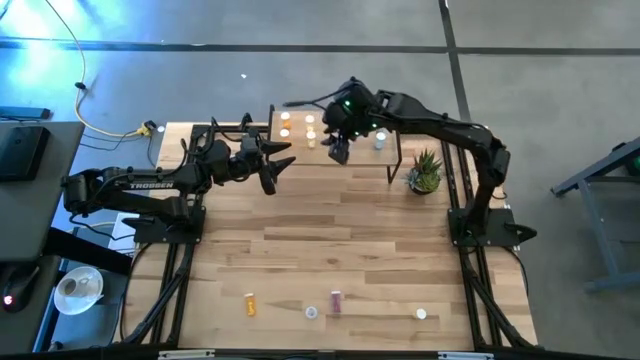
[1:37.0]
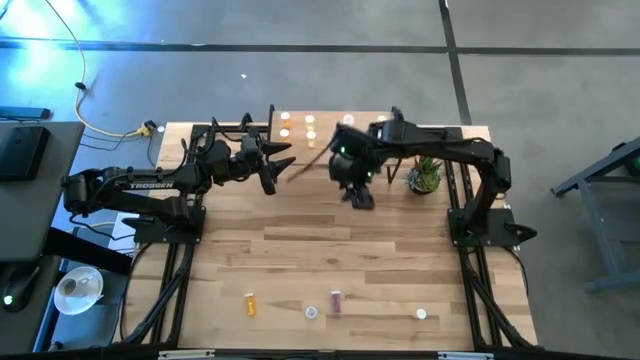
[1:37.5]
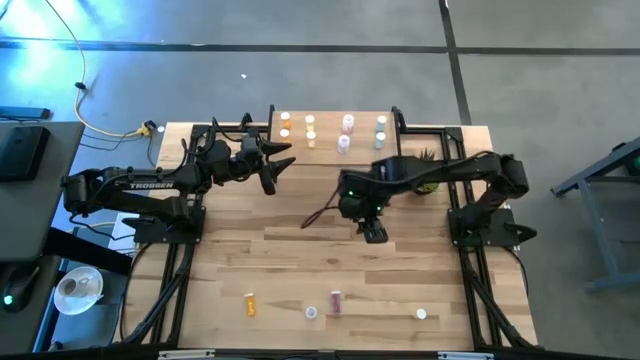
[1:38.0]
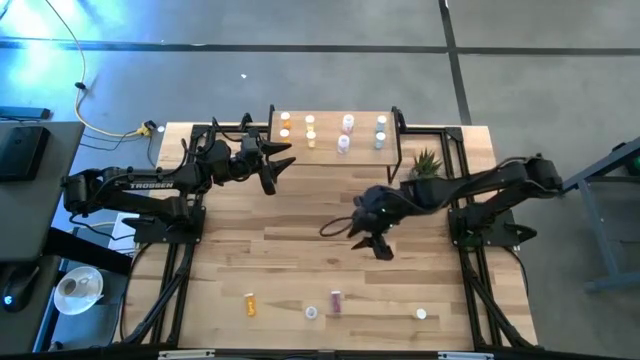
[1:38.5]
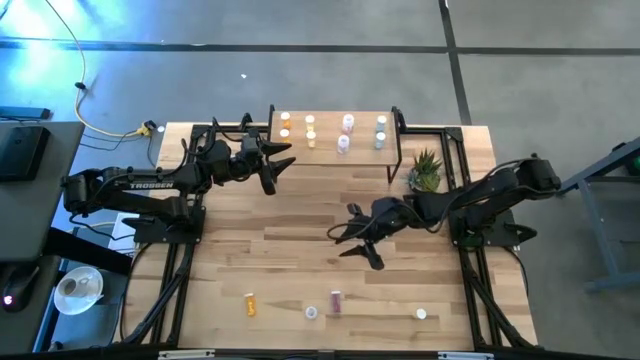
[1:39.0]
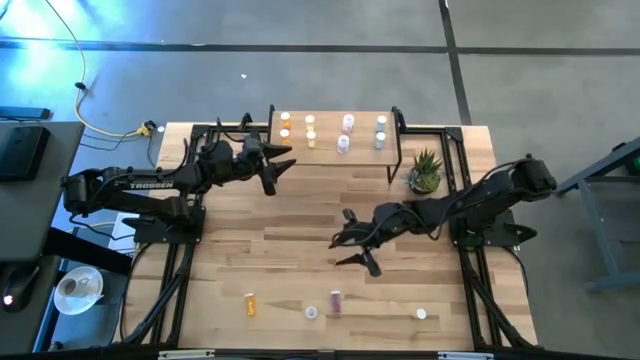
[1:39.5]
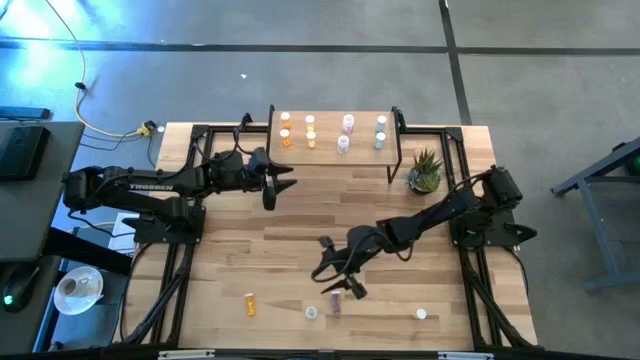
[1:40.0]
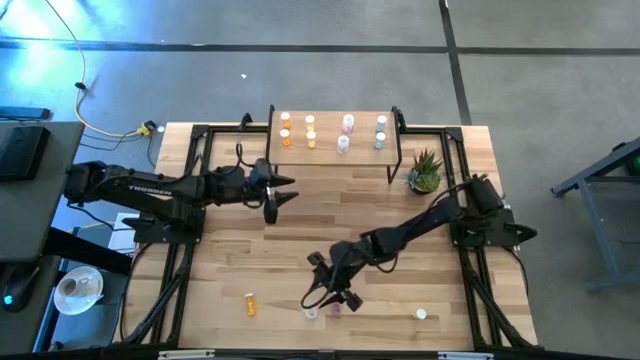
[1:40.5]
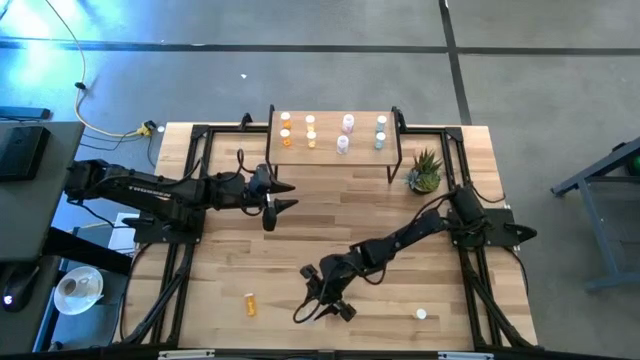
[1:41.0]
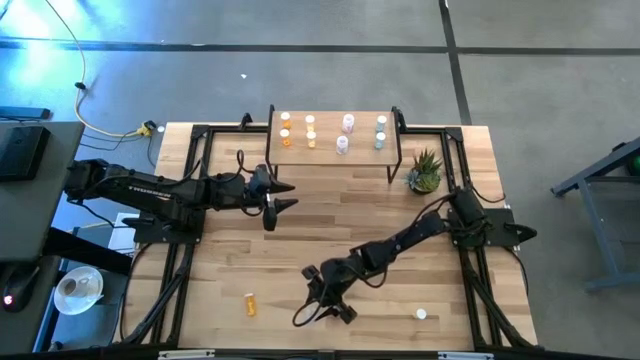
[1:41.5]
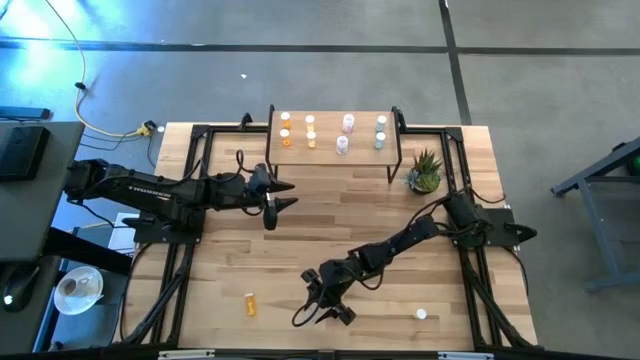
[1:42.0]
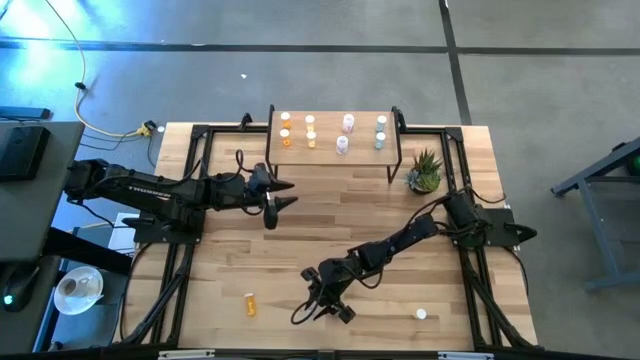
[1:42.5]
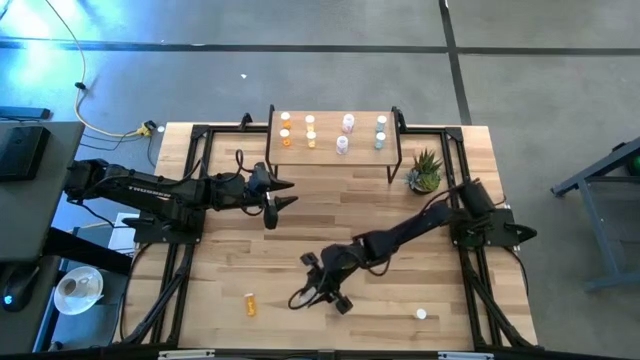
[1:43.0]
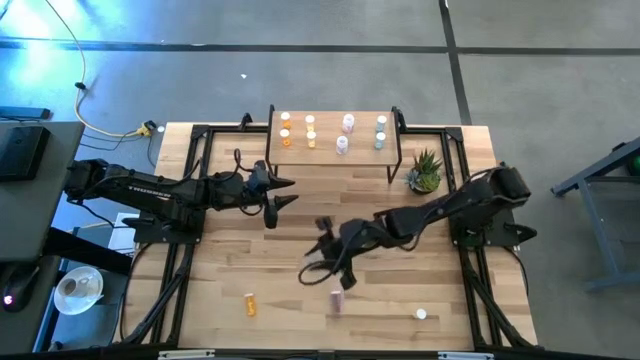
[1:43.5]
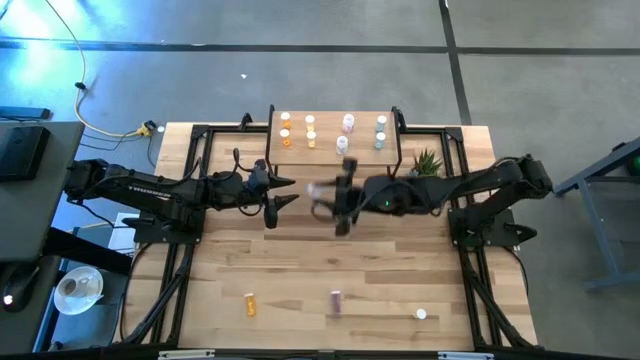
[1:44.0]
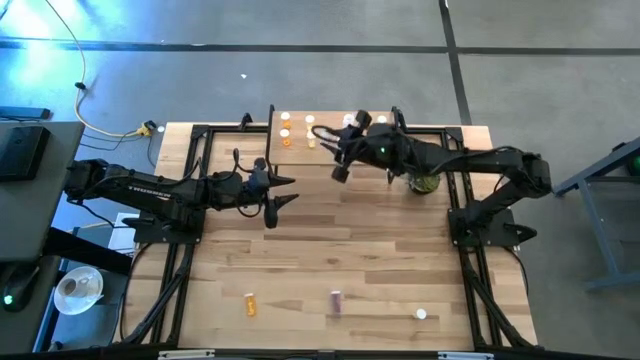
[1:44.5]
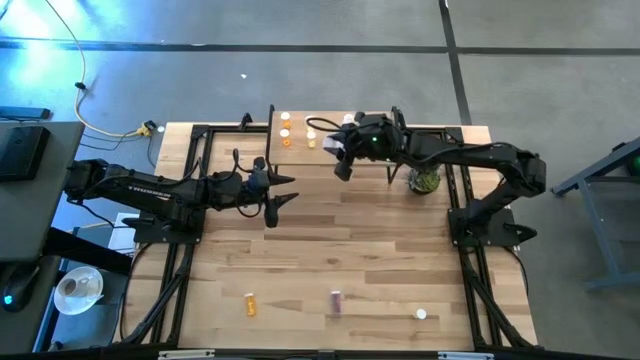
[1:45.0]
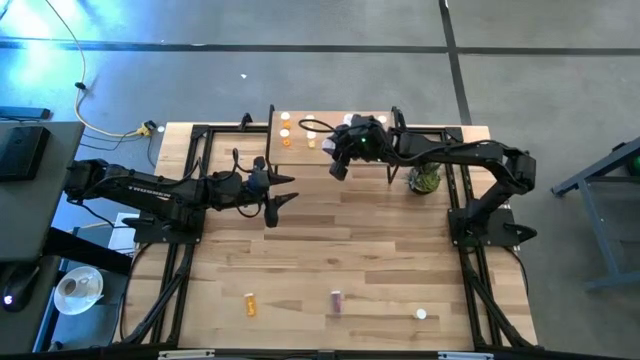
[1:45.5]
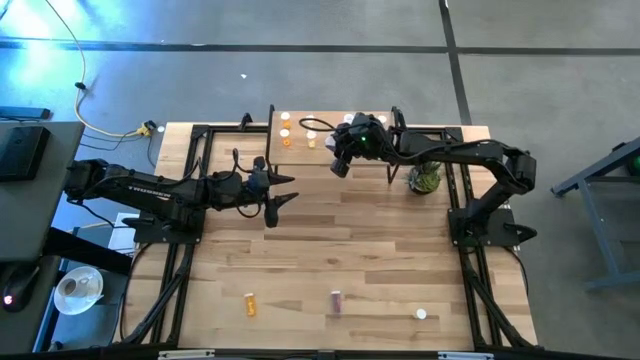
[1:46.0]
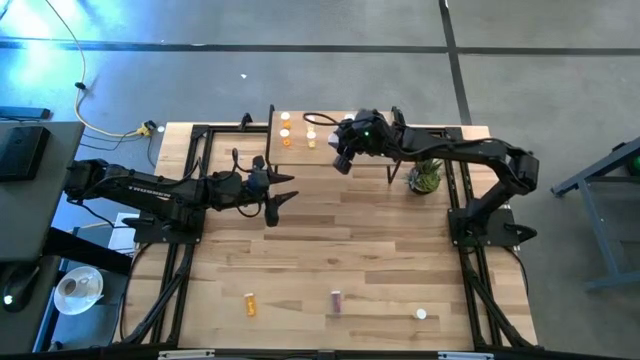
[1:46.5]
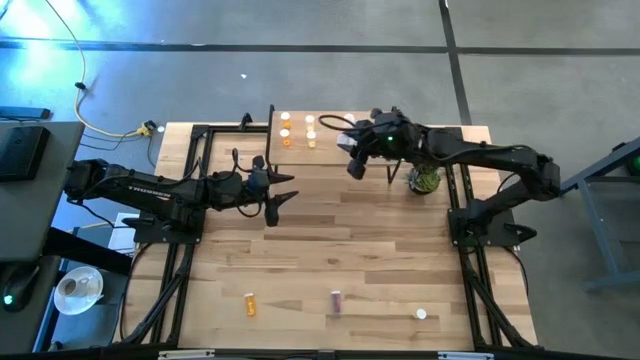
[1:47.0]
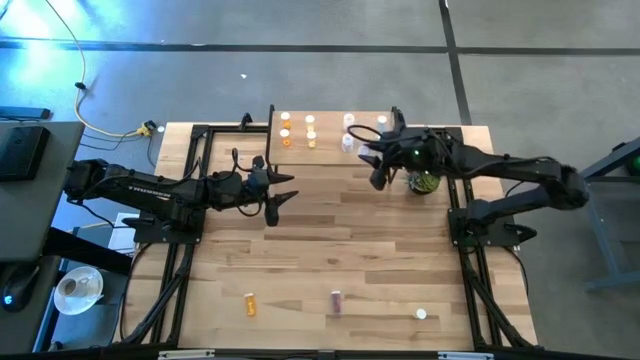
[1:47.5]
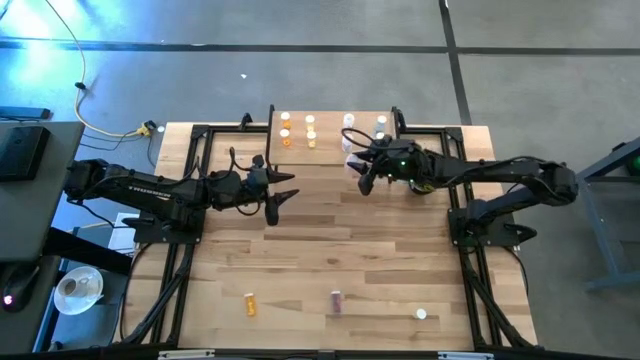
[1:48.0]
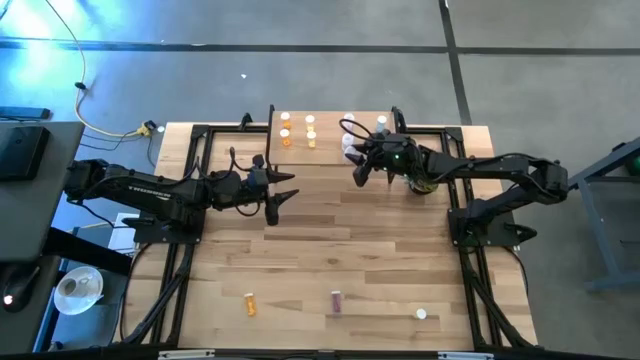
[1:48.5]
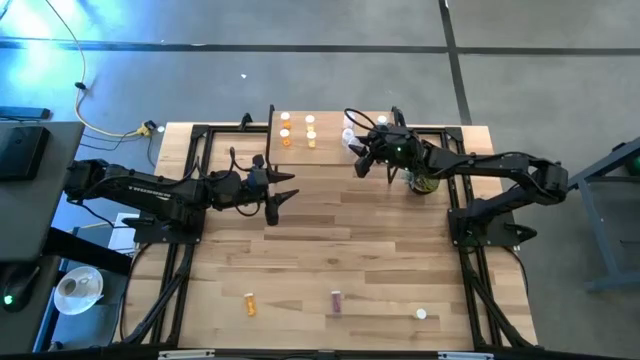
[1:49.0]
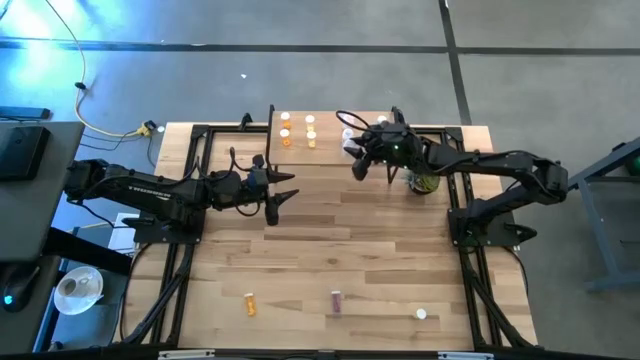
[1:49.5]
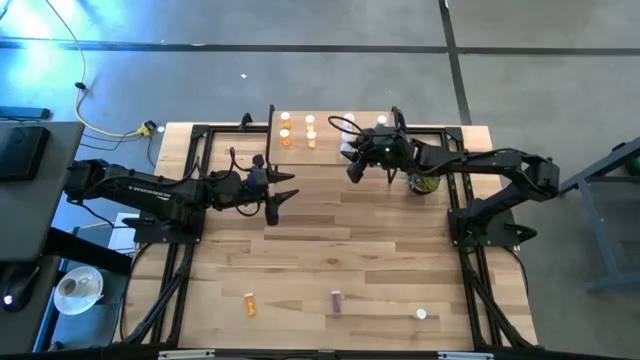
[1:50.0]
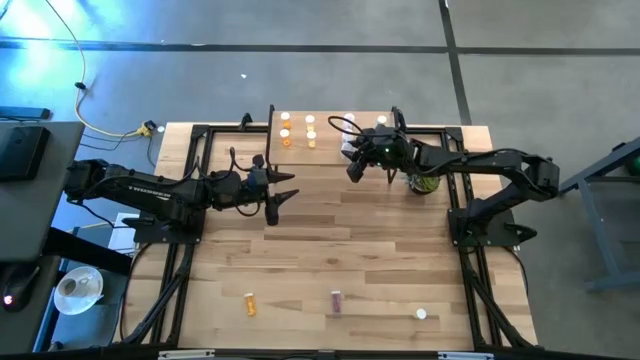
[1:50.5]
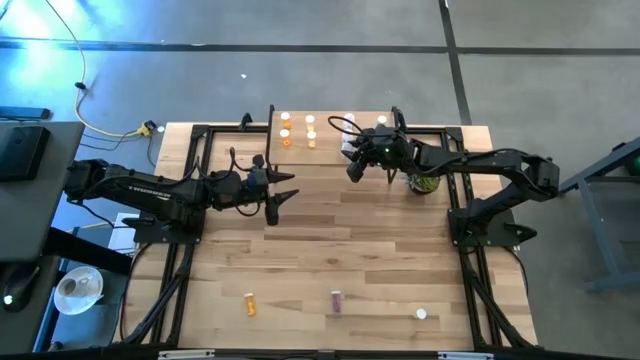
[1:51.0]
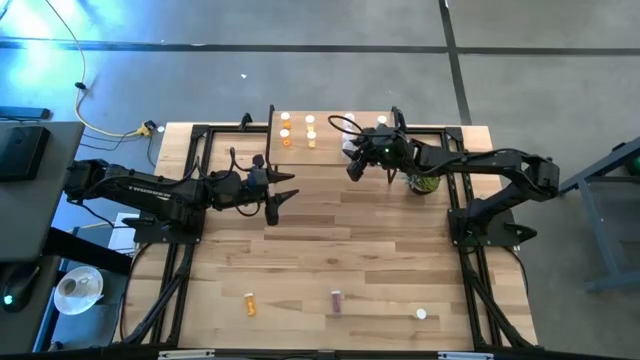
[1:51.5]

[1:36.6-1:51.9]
Task: Pick and place medicine bottles onto shelf by color
Put the white pill bottle on the shelf aligned with the other white pill bottles

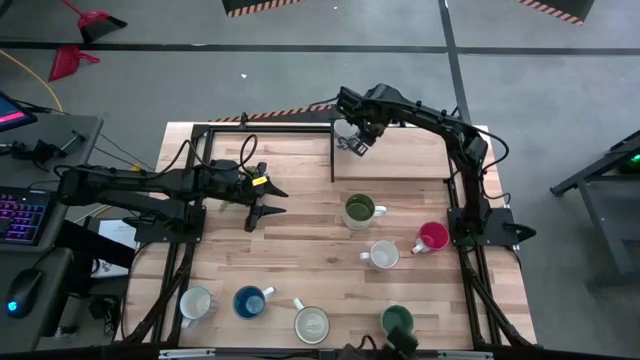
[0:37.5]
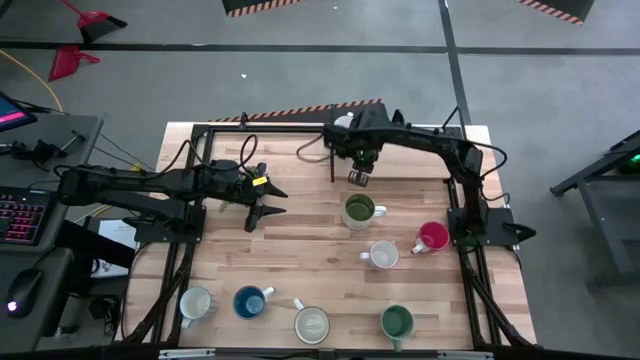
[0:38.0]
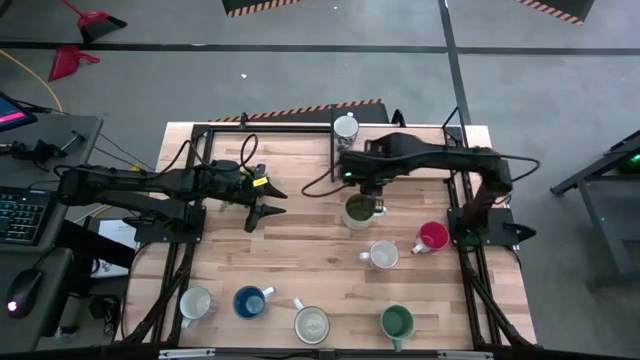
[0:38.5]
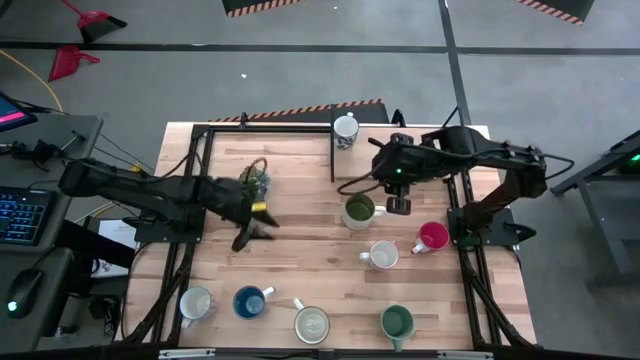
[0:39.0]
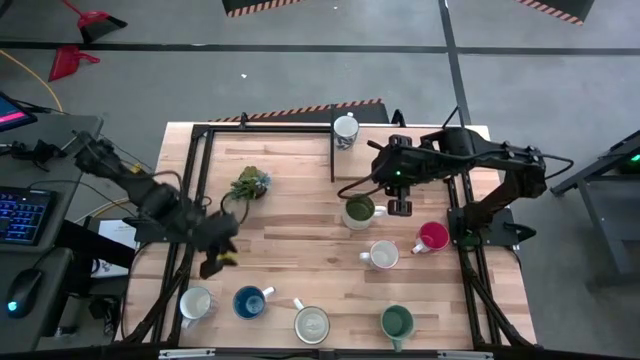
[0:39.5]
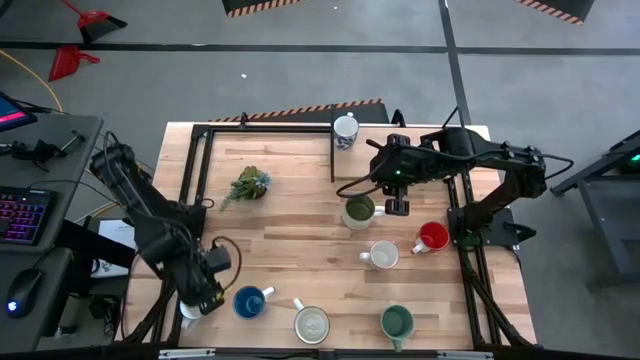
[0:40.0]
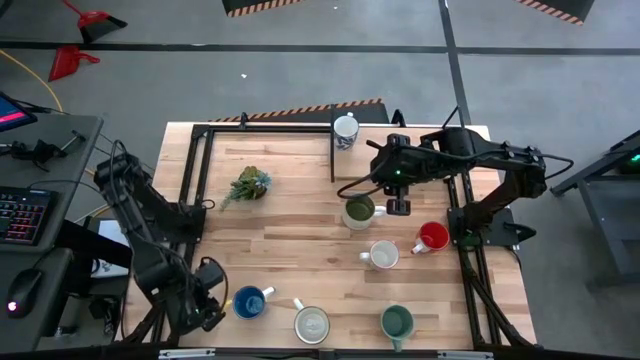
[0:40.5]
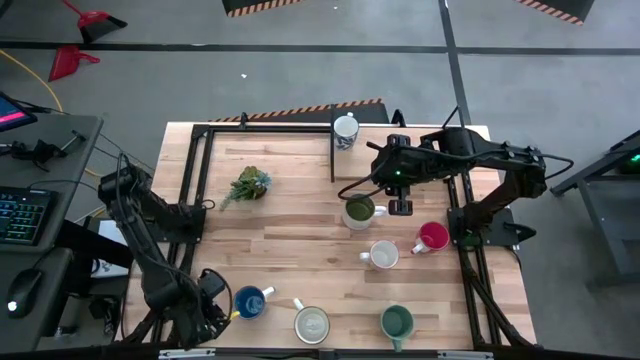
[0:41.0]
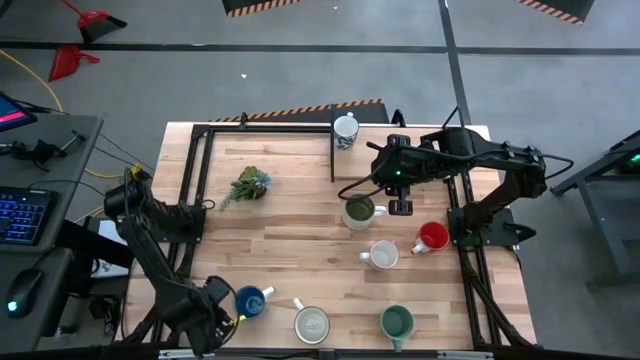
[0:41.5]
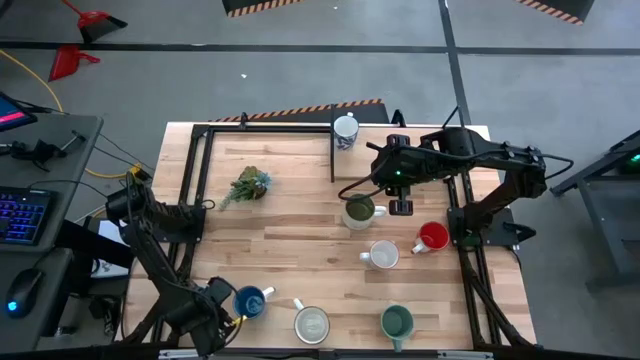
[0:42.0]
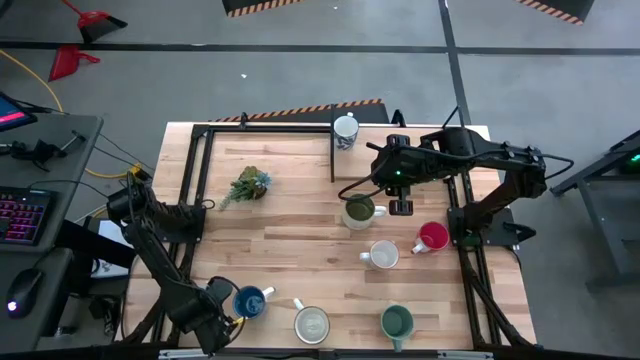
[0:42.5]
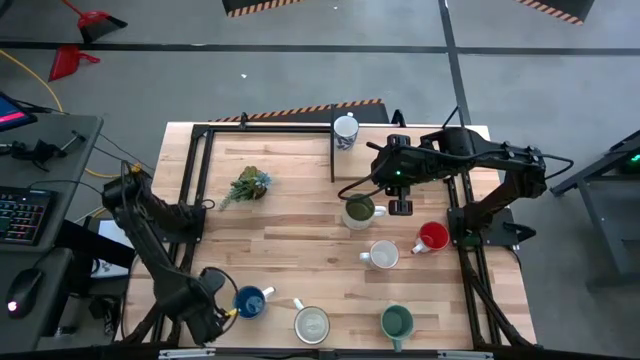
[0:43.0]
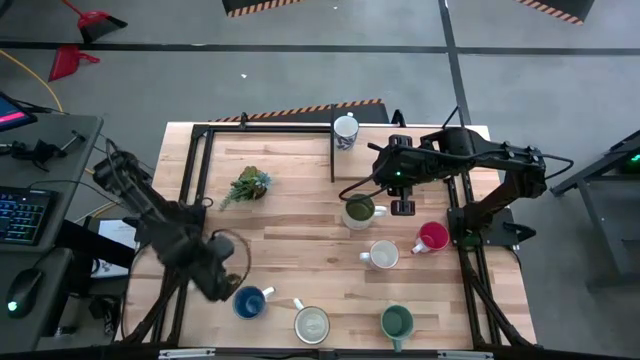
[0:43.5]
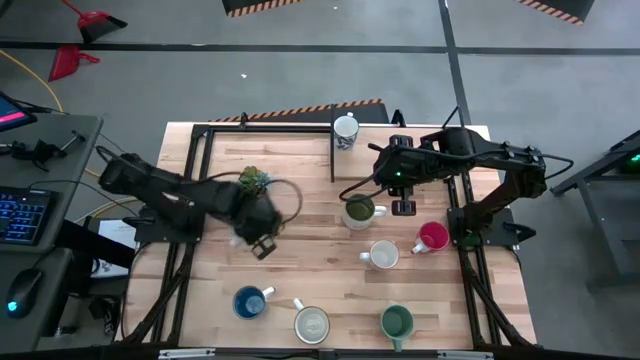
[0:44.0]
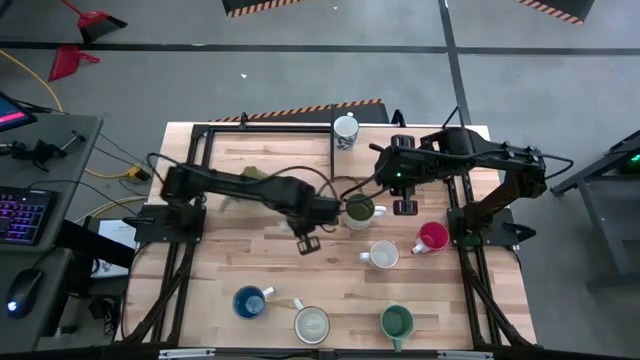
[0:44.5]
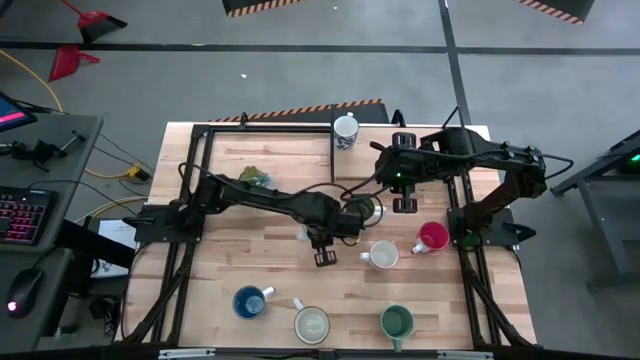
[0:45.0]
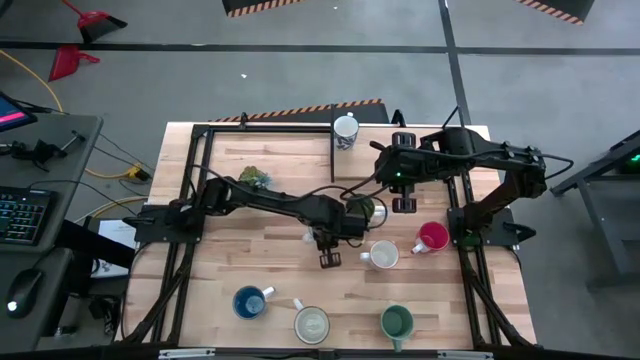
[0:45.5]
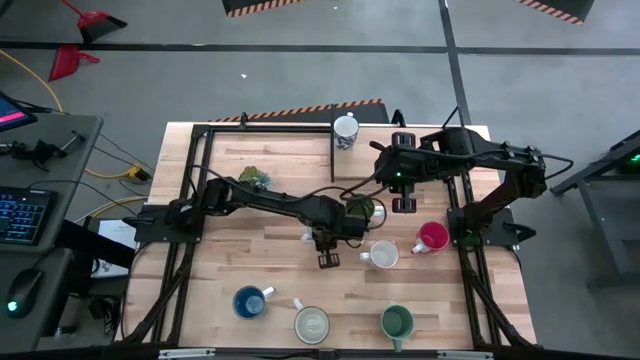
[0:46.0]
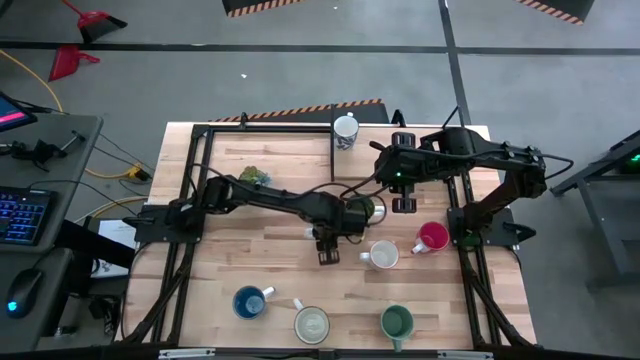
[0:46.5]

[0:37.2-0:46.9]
Task: Place coffee mugs
Move the white red mug to the center of the table
